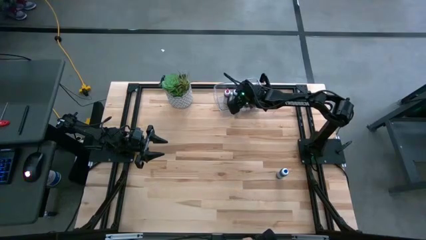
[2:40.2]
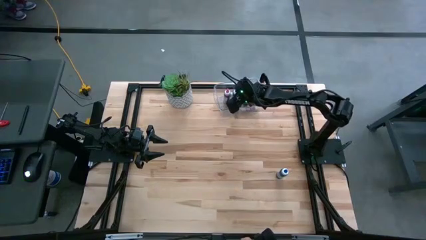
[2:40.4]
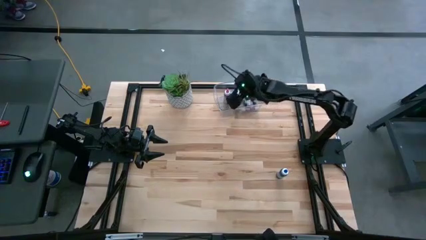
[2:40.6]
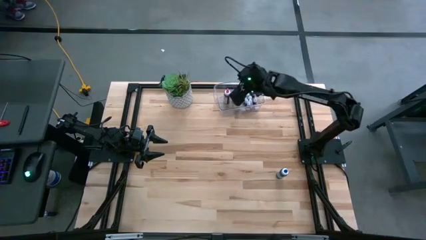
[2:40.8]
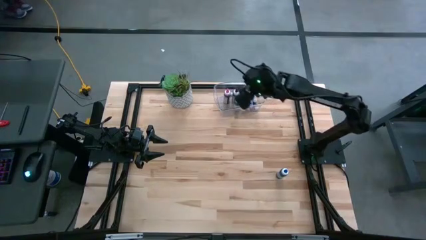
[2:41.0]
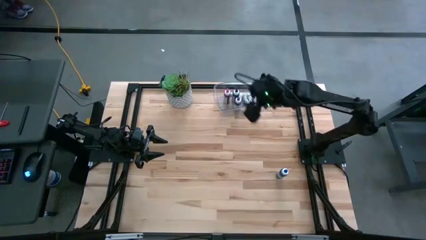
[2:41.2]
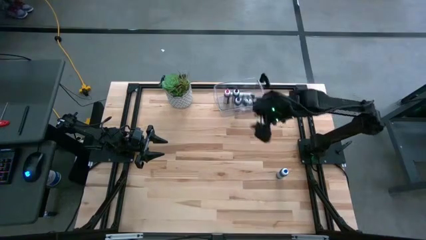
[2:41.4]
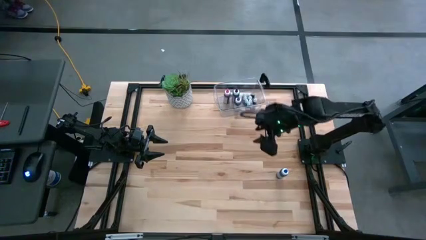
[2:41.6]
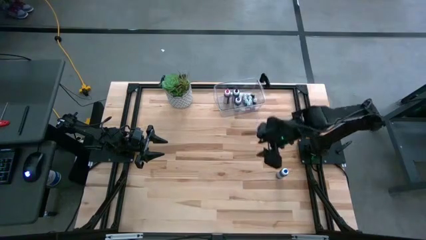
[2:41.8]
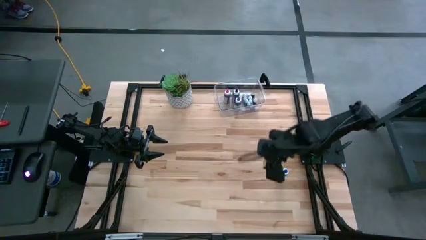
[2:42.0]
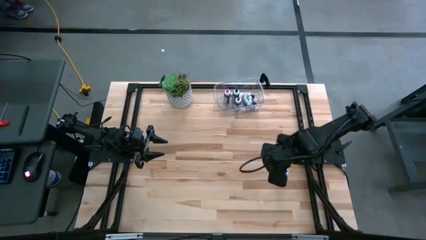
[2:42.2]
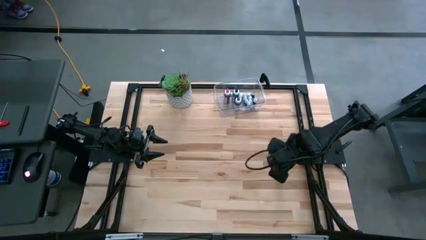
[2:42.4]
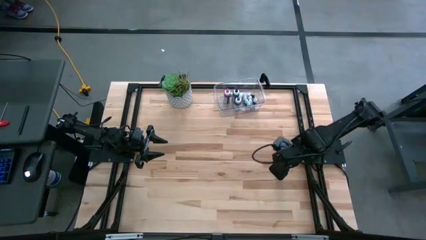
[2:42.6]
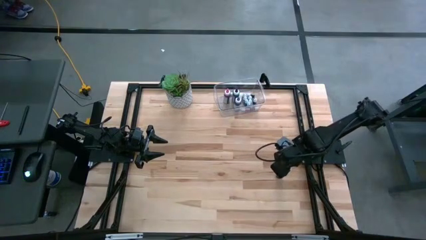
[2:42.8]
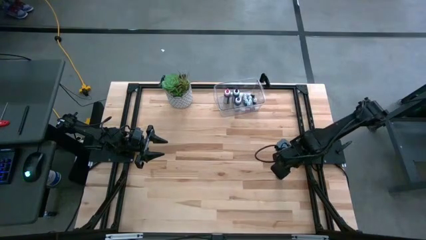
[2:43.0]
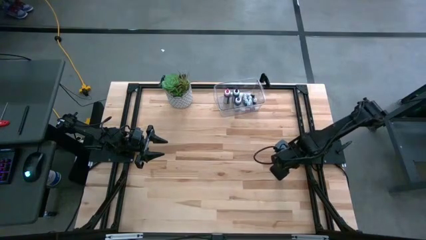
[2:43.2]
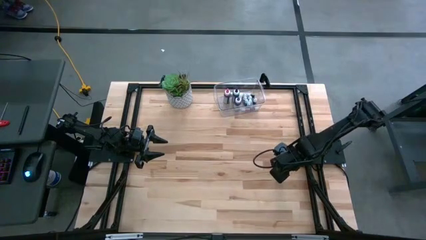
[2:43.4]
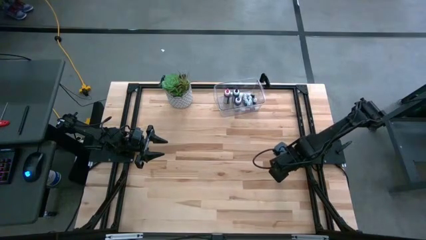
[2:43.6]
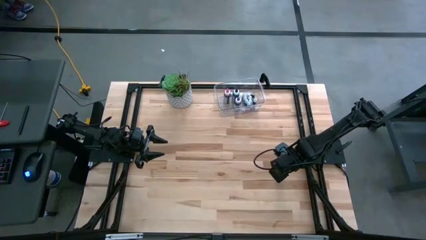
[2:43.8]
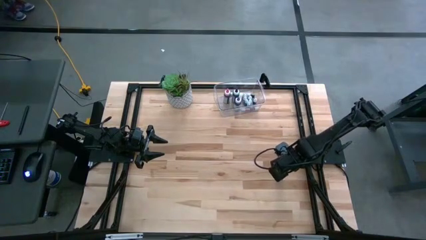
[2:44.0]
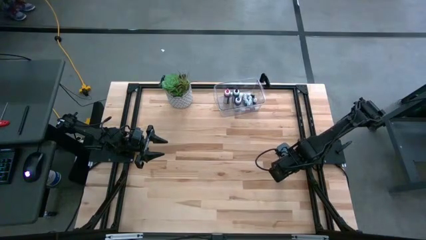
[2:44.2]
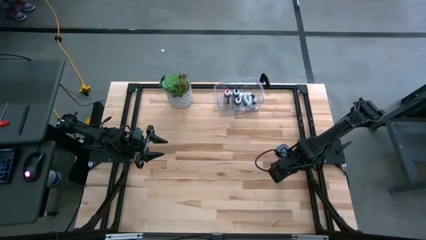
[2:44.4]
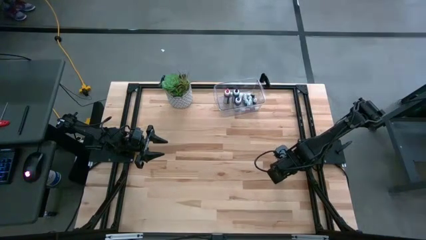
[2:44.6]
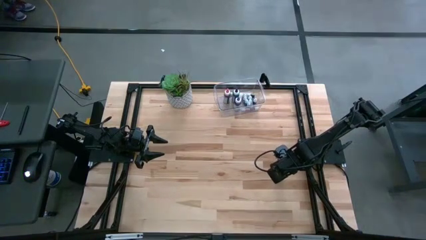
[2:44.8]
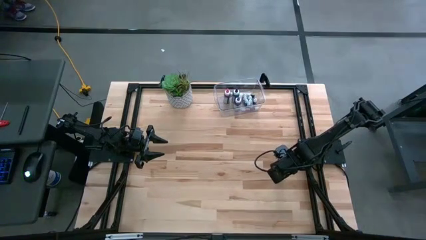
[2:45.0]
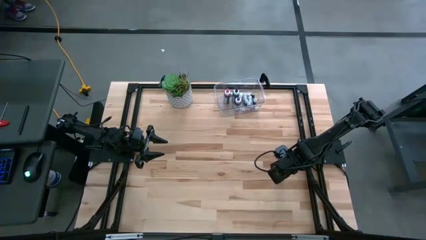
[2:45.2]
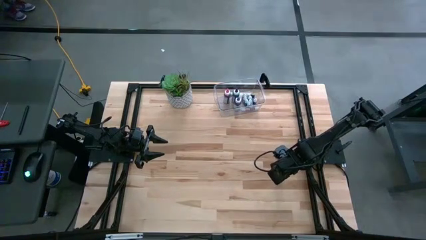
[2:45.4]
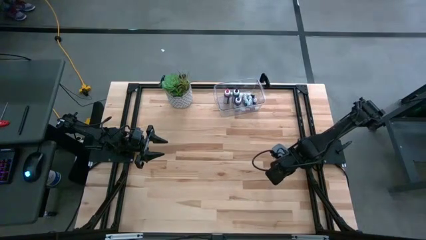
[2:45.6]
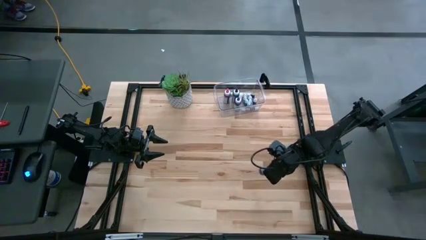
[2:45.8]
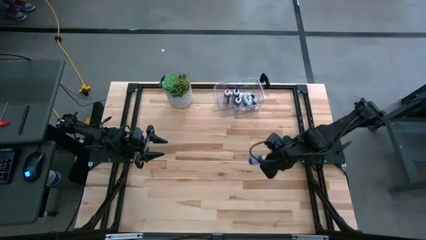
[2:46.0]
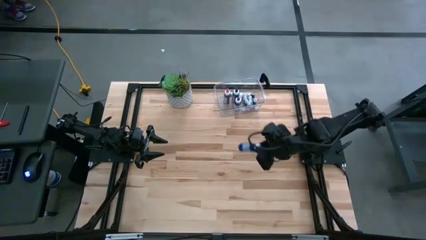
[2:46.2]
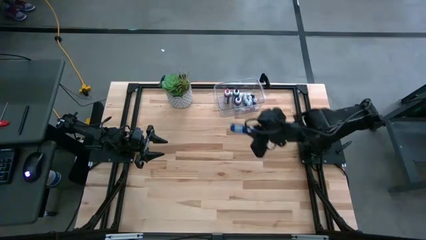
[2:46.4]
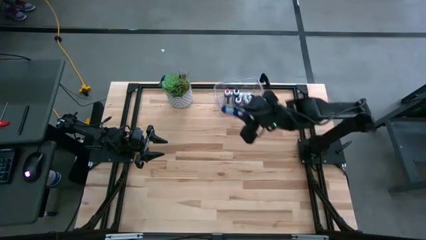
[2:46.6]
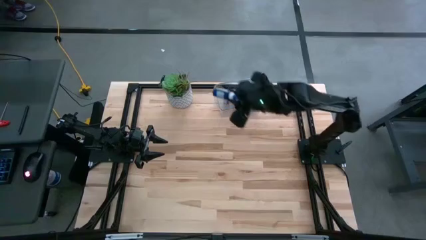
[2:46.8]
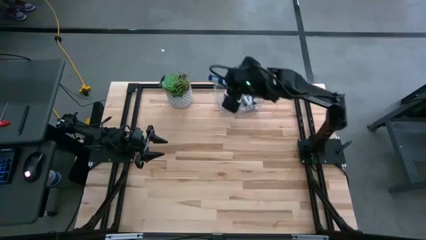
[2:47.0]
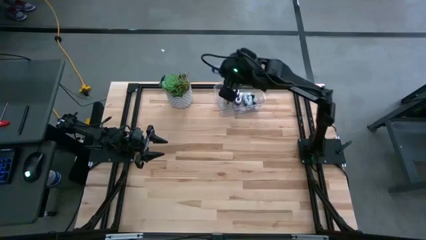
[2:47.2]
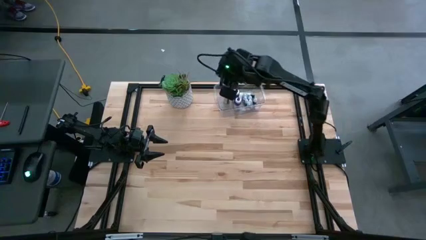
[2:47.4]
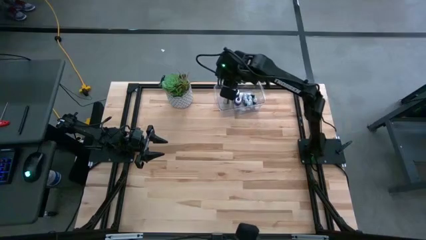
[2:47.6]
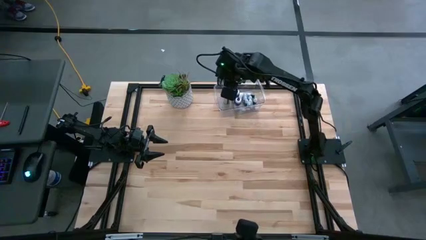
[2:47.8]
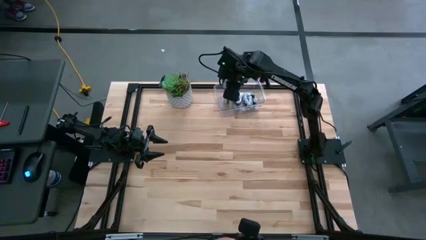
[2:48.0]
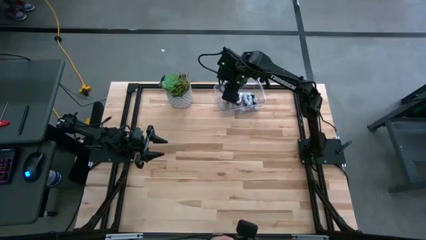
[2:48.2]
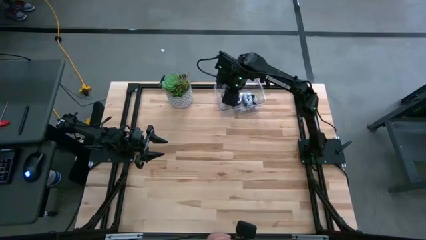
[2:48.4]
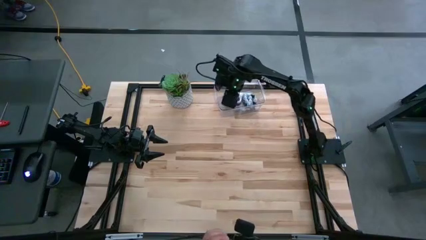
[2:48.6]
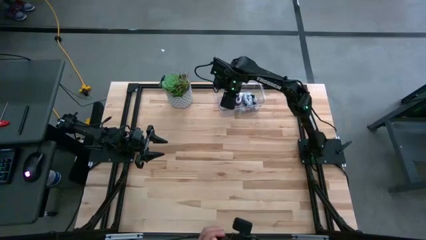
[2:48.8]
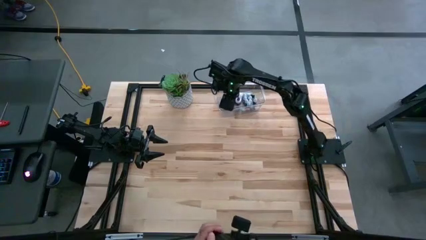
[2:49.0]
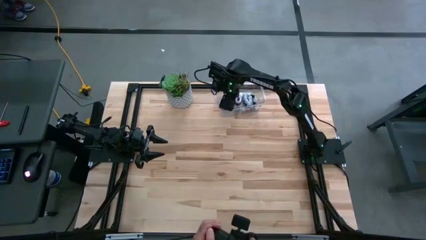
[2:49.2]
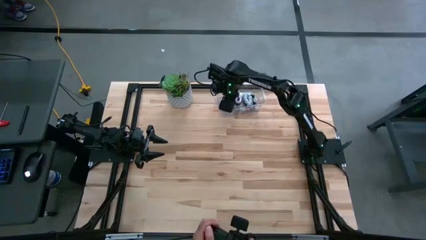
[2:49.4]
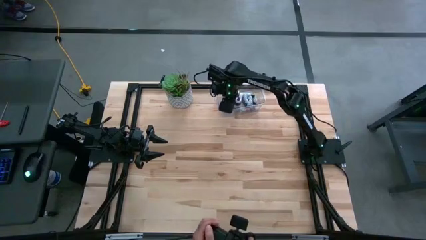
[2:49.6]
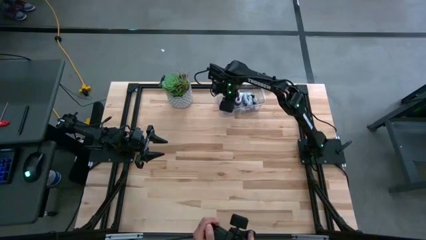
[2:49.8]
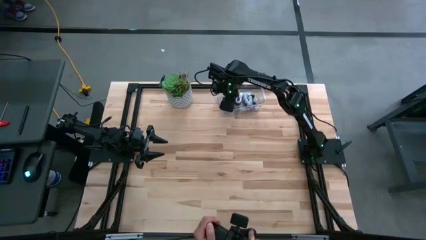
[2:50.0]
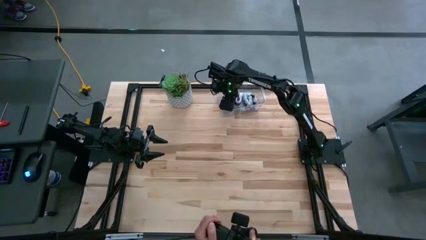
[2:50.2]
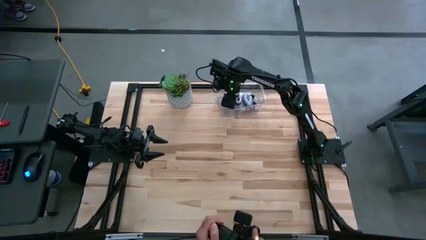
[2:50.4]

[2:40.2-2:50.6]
Task: Pick & Place food coloring
Put the large blue food coloring bottle into the bin

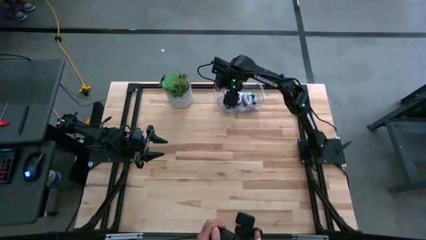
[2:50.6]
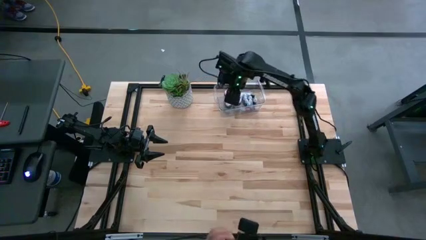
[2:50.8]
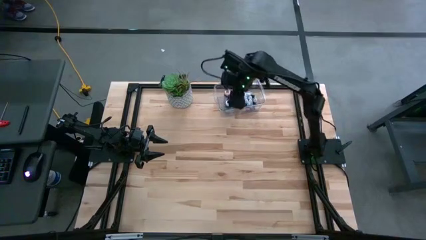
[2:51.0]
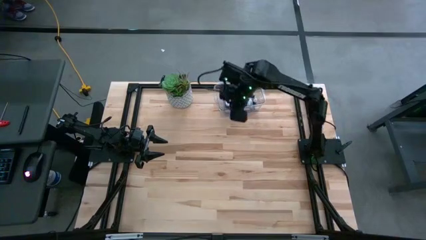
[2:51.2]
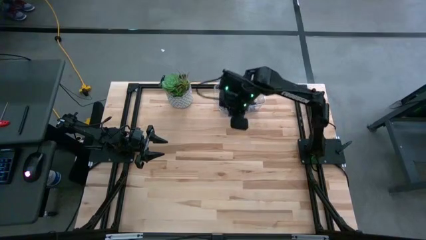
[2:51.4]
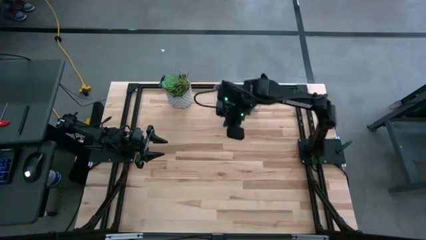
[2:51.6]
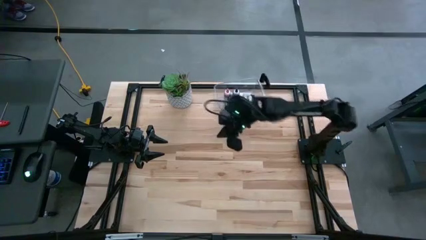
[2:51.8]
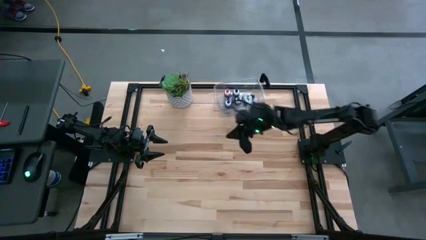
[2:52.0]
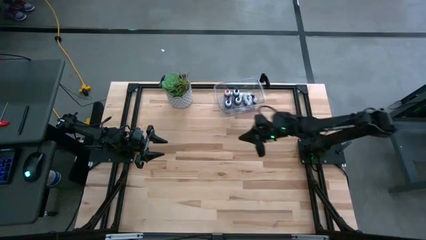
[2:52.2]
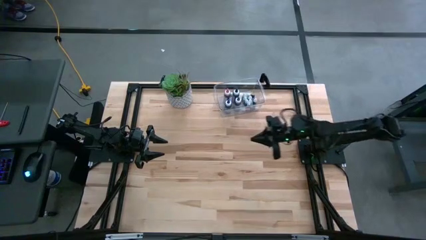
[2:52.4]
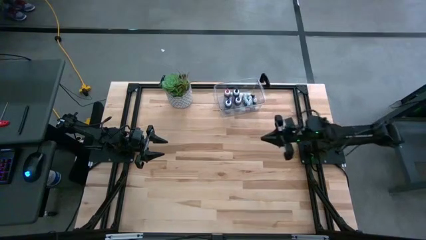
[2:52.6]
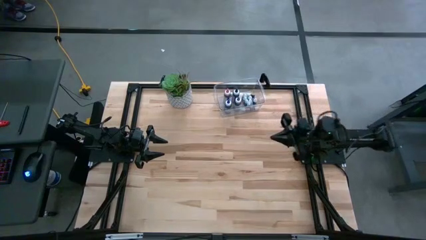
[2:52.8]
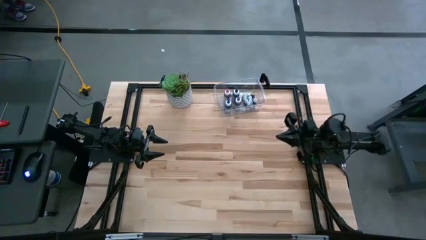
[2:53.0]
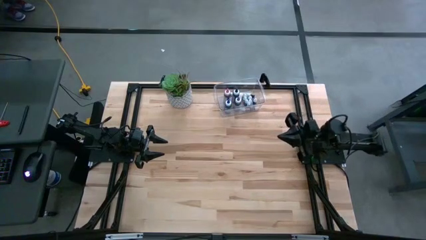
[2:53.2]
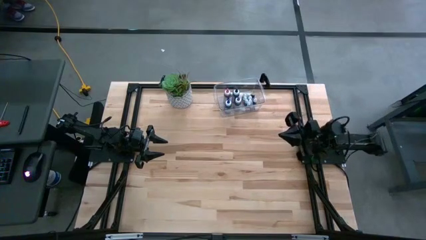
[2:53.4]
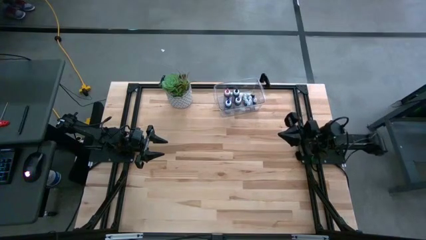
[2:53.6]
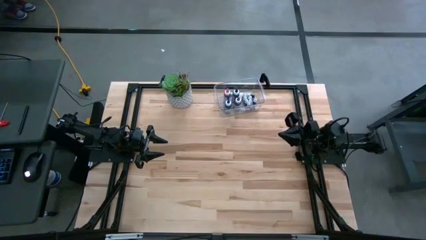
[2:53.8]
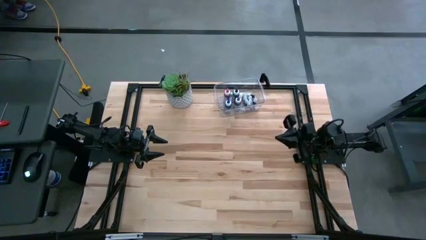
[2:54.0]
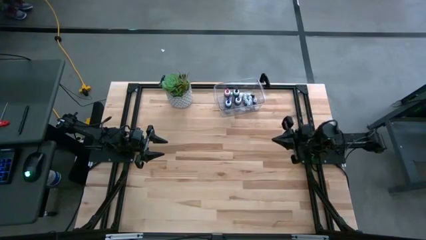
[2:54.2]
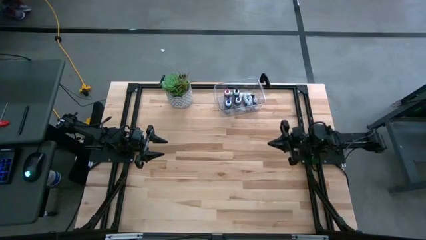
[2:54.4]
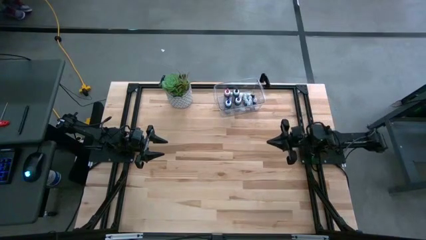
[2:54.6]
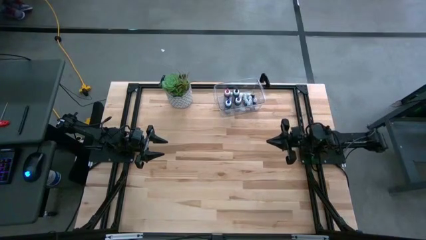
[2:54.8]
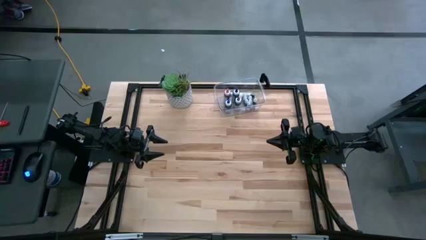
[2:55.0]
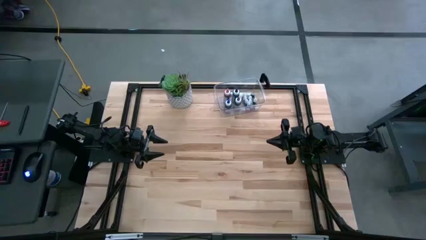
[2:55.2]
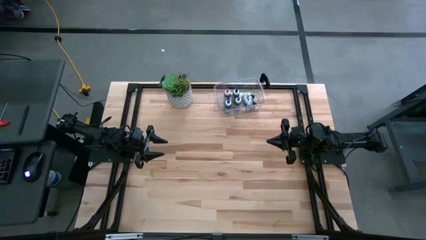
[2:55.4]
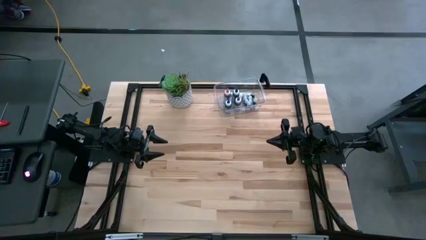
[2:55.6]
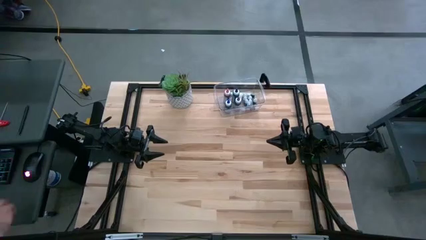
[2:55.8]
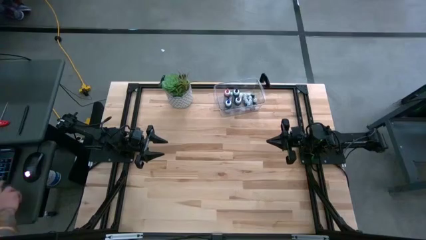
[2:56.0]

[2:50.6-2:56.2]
Return to Home Position
